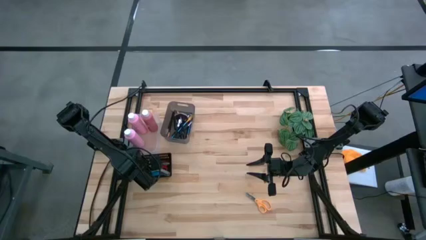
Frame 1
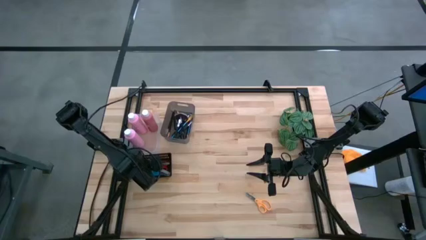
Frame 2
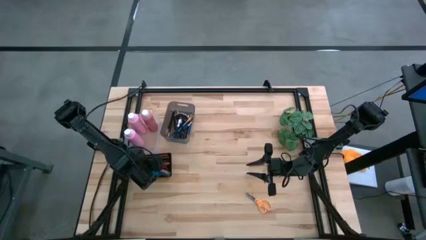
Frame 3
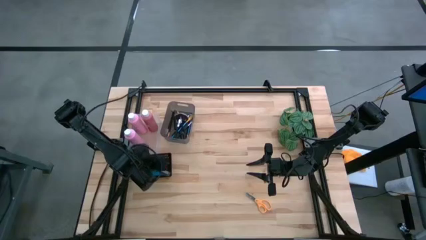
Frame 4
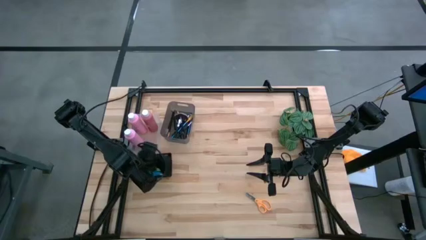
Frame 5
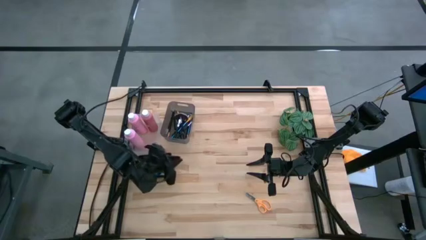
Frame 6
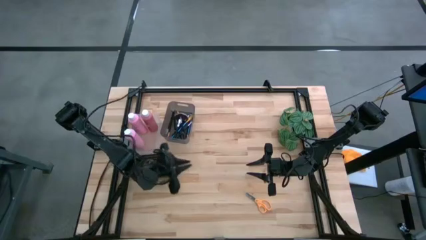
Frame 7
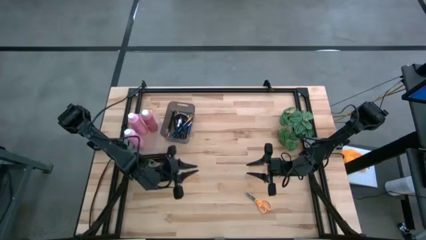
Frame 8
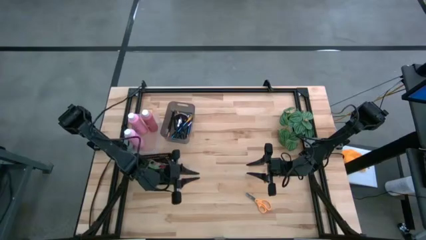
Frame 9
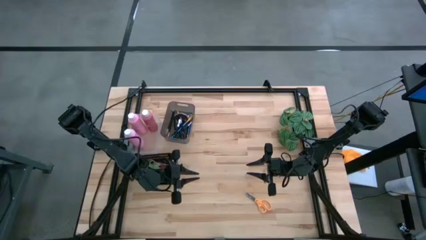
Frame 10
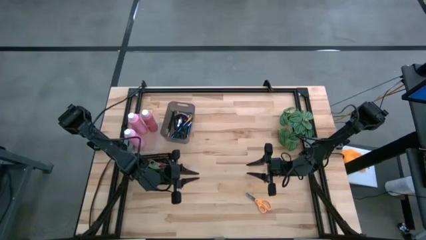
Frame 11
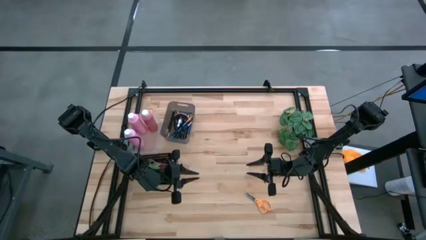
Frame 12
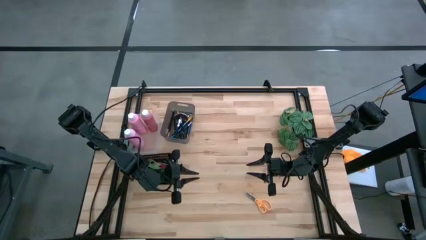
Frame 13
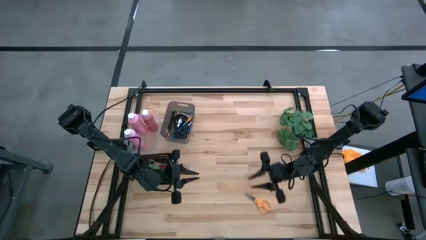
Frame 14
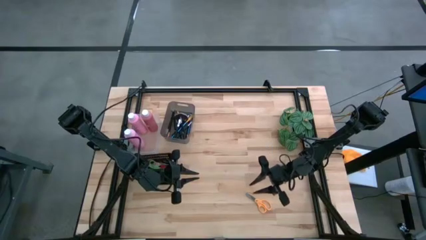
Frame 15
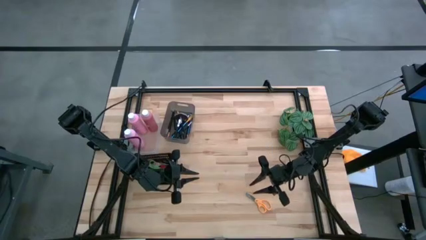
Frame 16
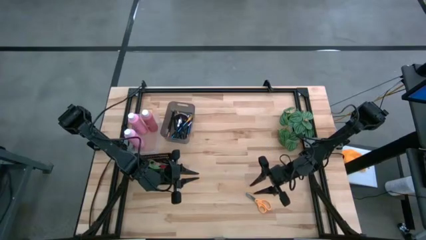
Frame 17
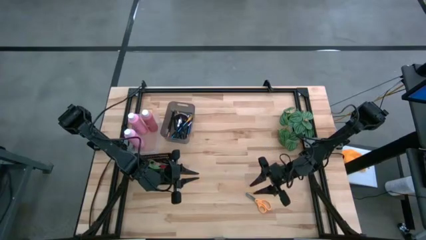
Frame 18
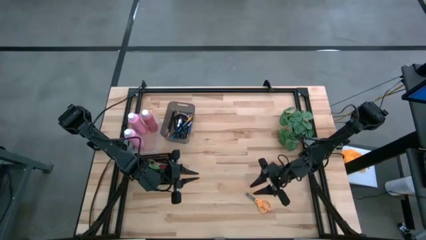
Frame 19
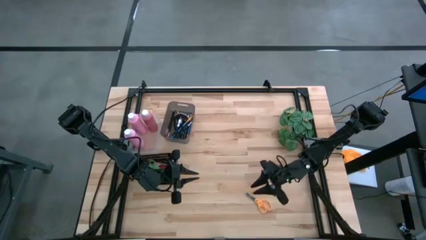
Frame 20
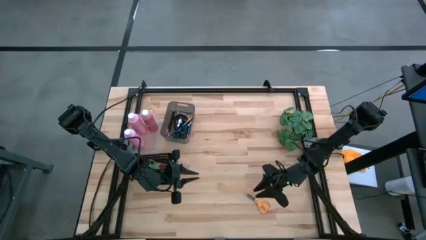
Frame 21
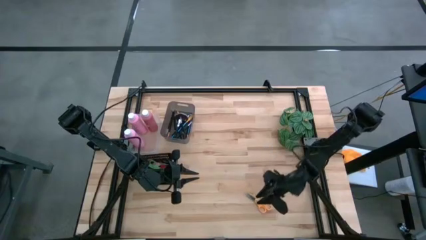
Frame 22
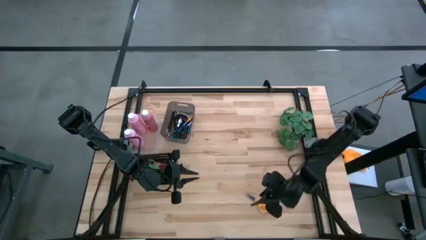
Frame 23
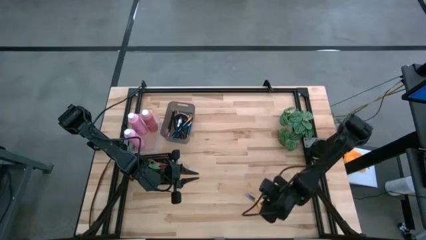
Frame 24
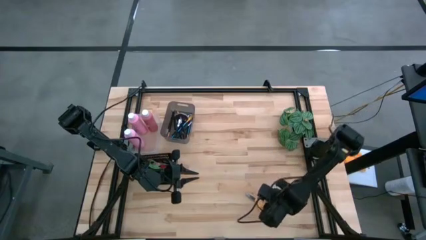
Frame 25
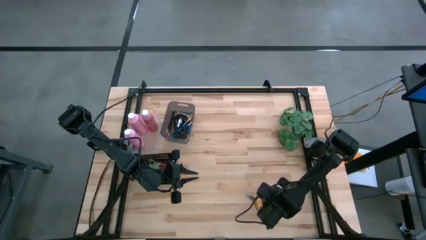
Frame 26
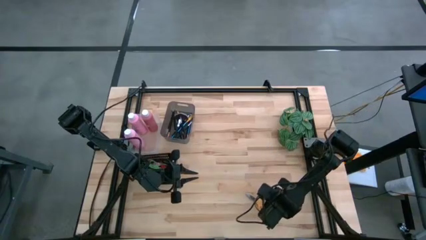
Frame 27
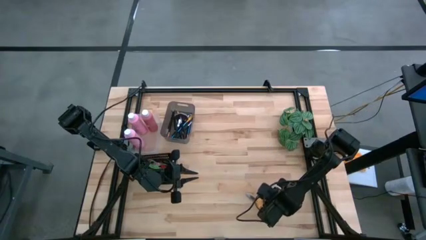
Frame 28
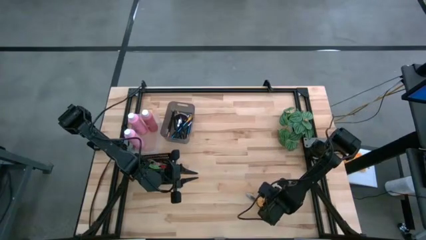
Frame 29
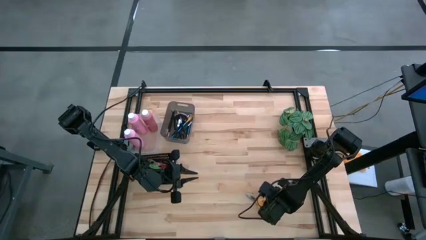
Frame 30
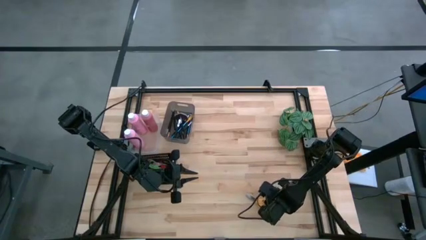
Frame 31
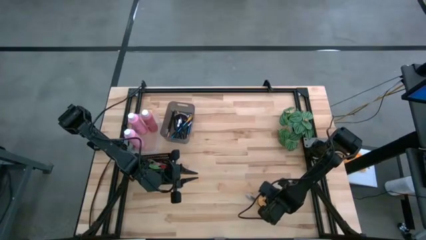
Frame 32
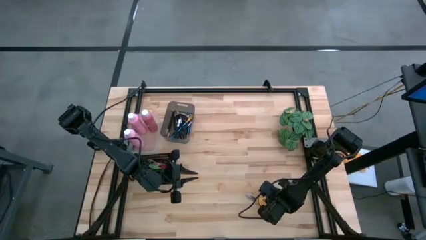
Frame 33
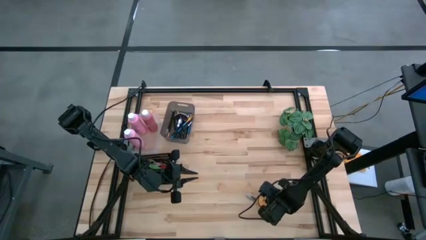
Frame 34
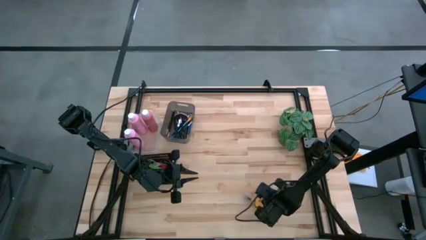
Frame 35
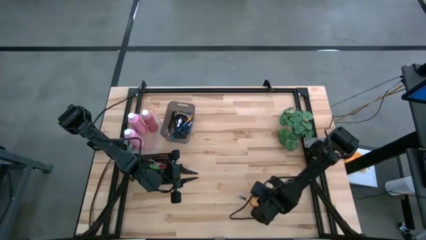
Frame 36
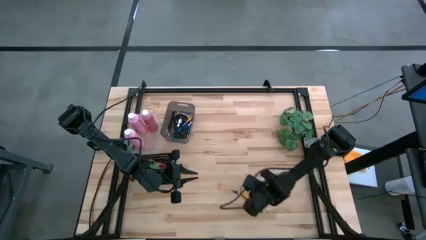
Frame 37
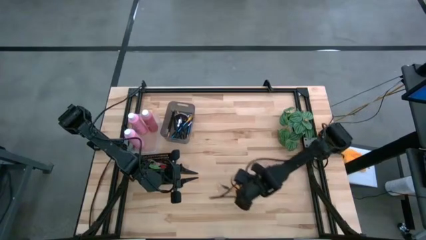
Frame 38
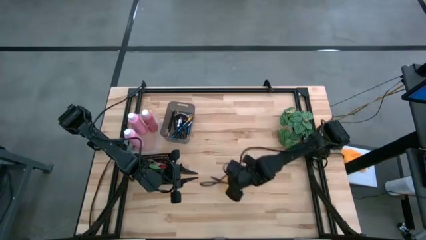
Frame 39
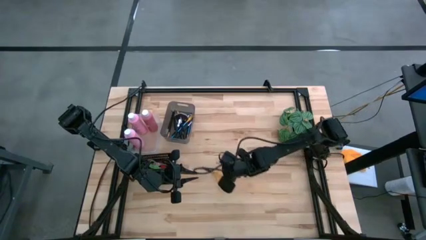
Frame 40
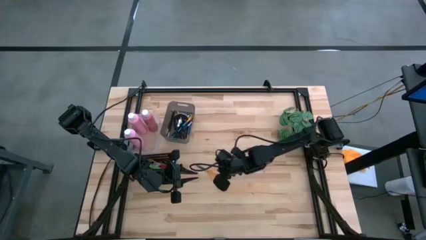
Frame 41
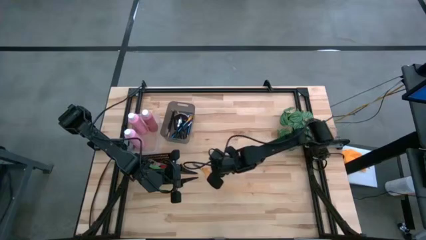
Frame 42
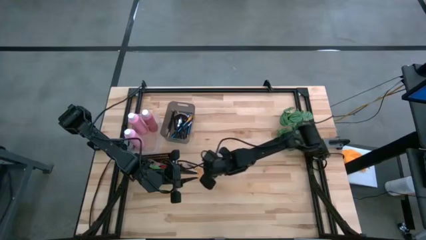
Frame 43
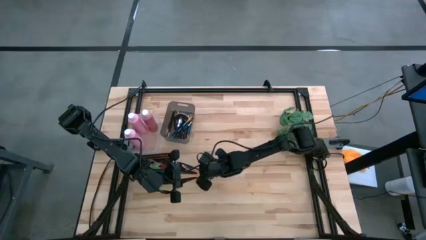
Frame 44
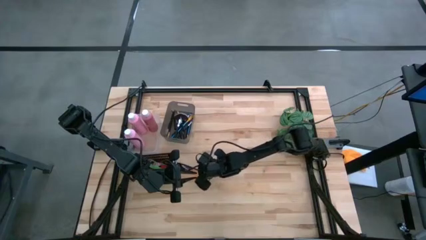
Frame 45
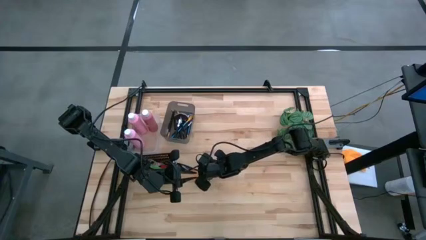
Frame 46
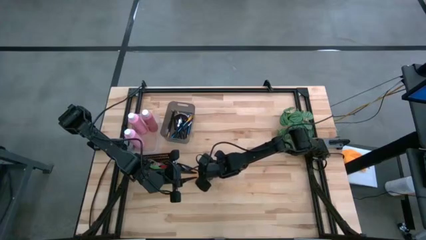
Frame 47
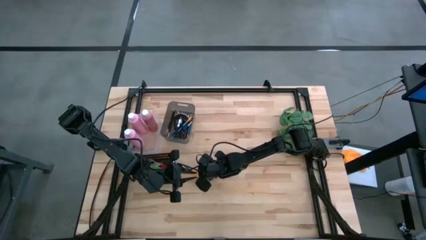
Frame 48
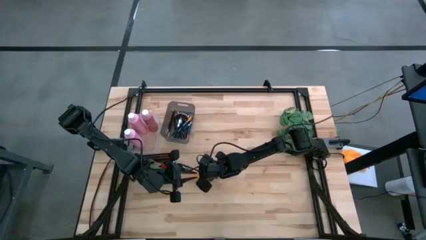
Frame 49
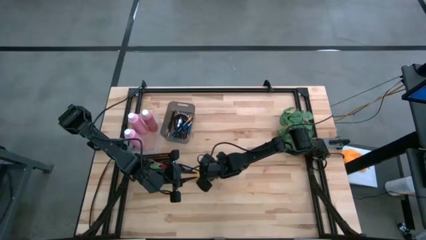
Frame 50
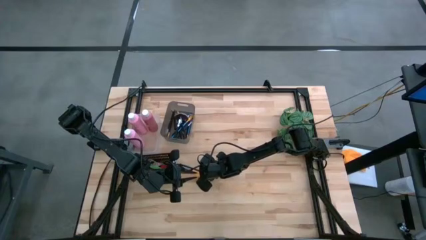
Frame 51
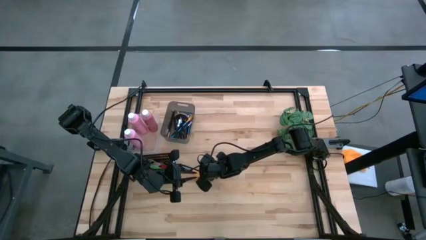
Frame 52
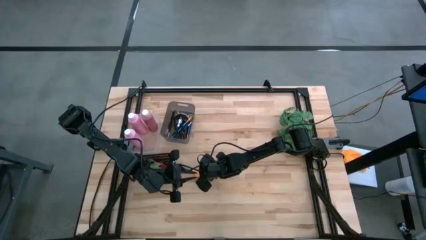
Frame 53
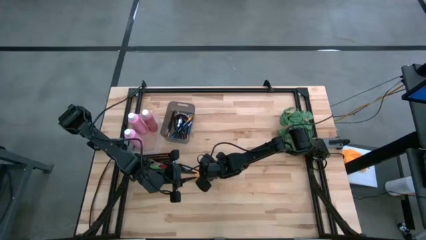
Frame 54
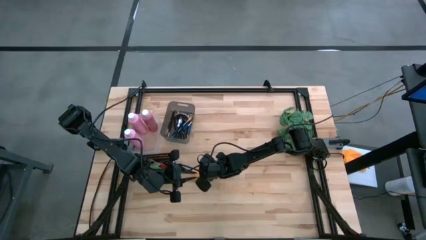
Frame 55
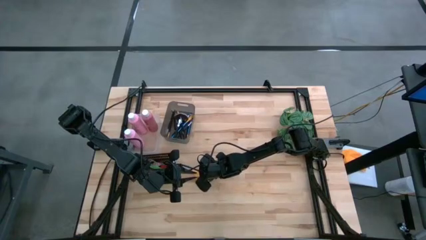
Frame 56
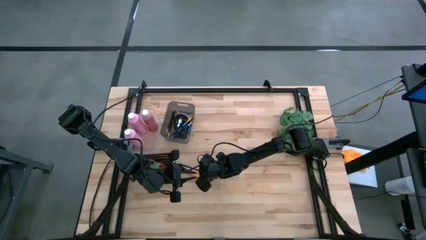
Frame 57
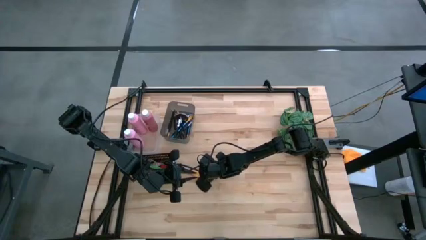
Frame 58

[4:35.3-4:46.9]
Task: Pick & Place Paint Supplies
Put the yellow scissors into the black basket
